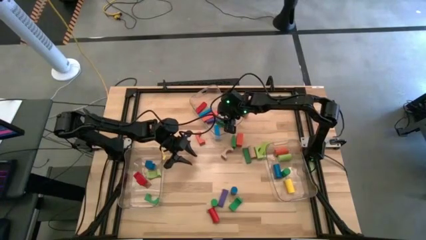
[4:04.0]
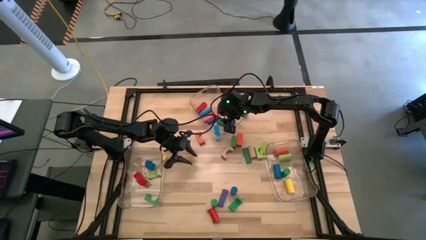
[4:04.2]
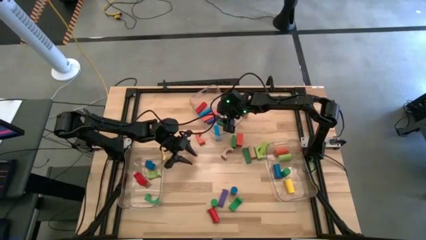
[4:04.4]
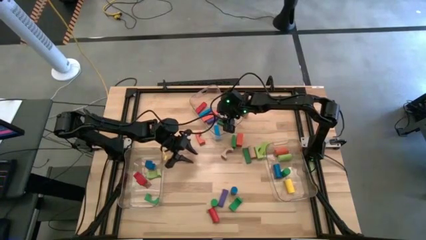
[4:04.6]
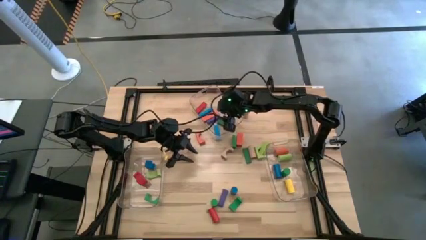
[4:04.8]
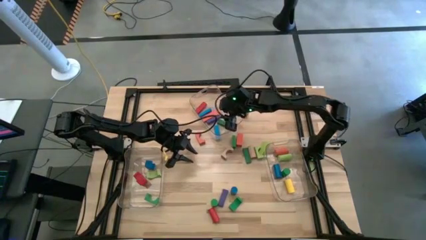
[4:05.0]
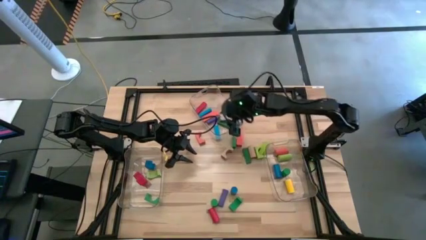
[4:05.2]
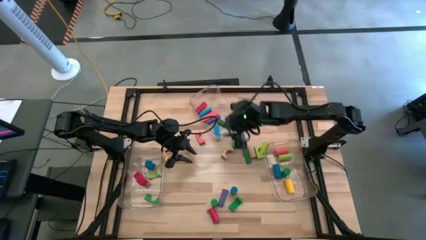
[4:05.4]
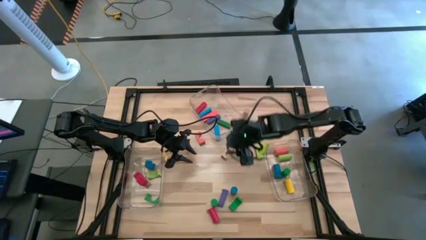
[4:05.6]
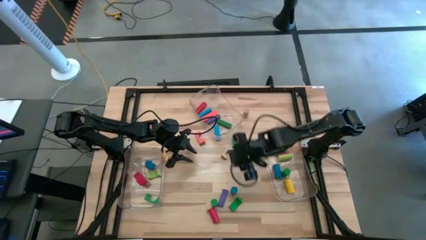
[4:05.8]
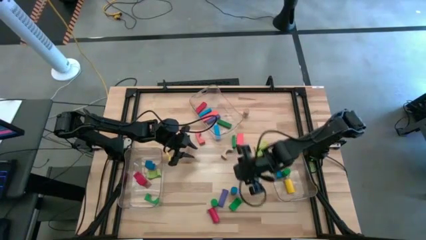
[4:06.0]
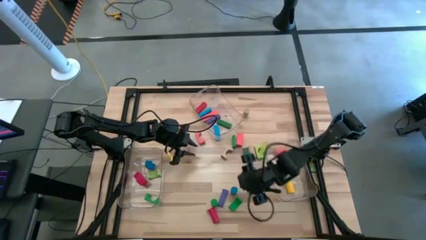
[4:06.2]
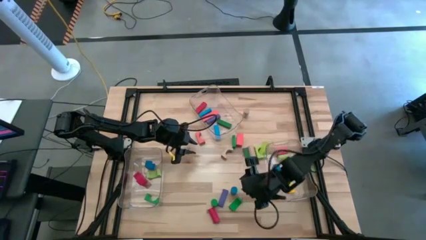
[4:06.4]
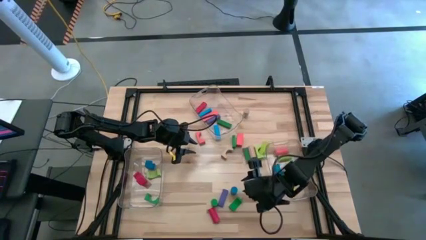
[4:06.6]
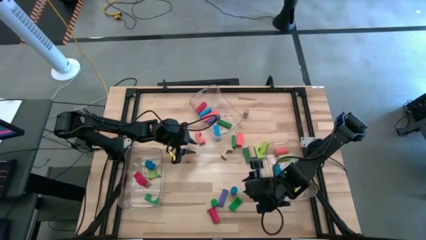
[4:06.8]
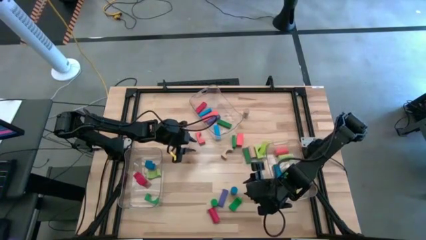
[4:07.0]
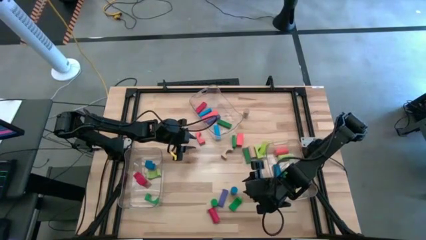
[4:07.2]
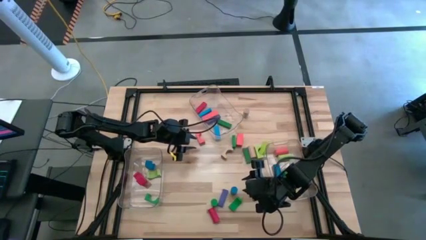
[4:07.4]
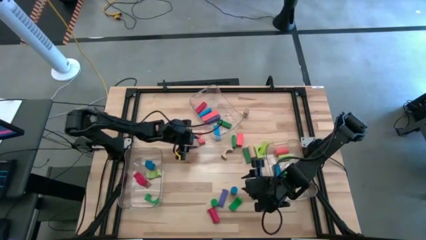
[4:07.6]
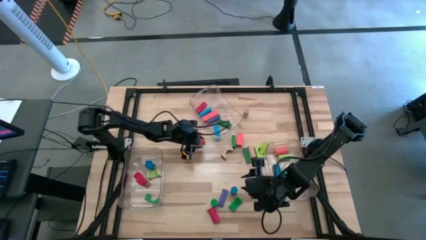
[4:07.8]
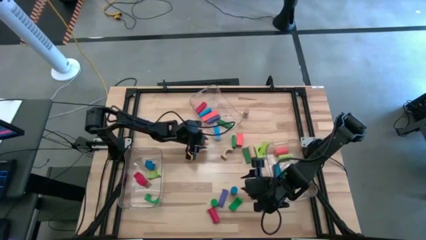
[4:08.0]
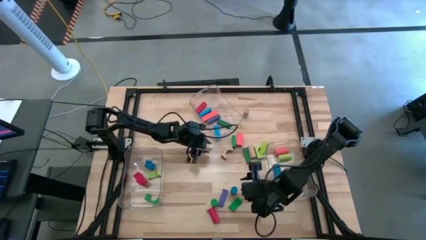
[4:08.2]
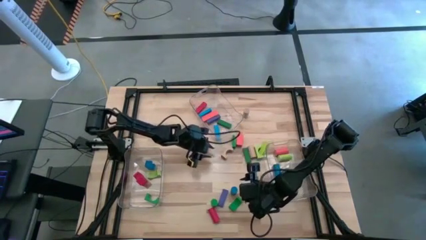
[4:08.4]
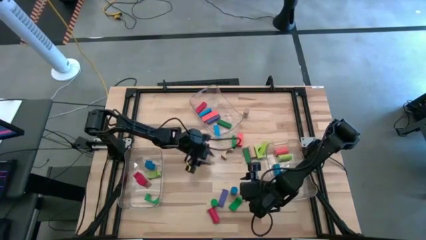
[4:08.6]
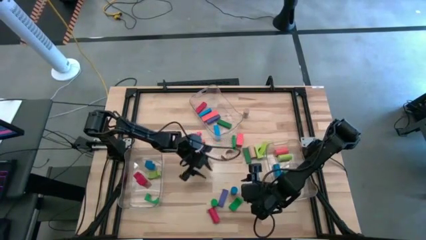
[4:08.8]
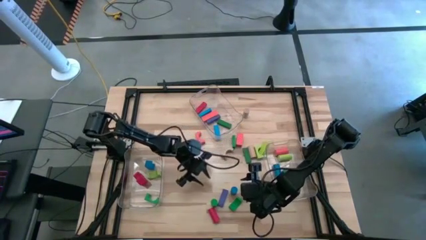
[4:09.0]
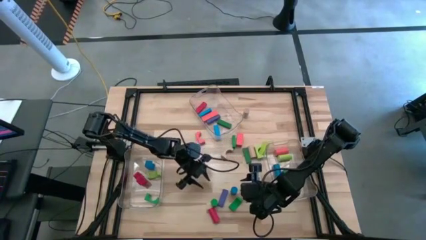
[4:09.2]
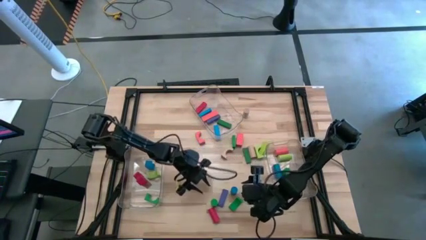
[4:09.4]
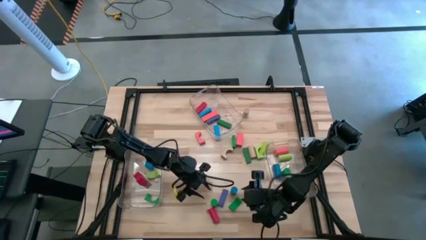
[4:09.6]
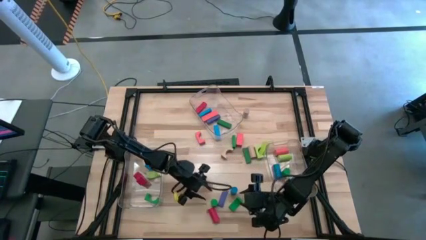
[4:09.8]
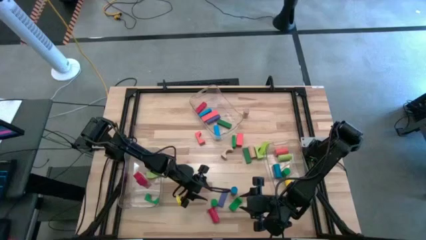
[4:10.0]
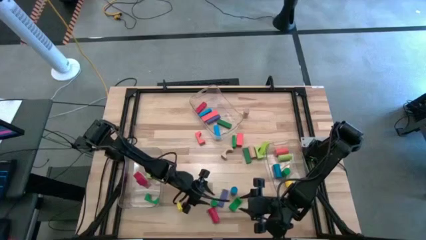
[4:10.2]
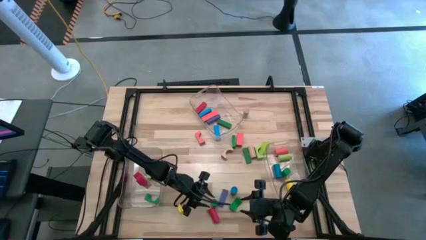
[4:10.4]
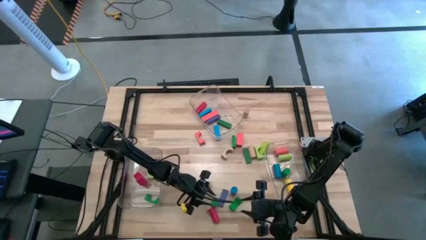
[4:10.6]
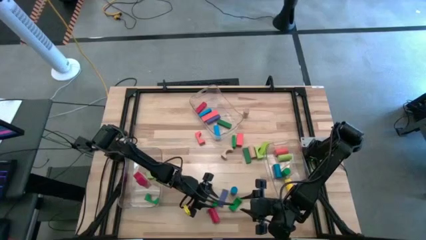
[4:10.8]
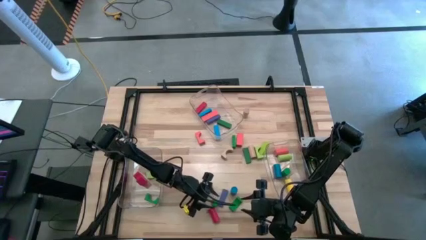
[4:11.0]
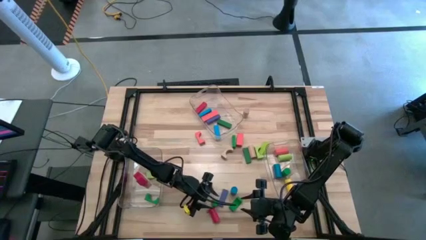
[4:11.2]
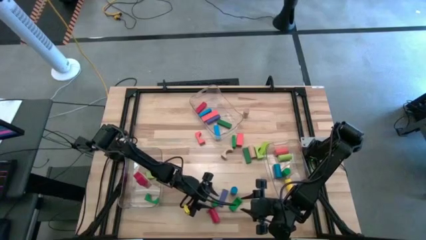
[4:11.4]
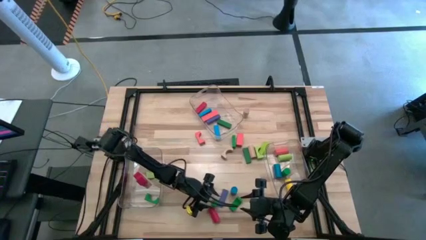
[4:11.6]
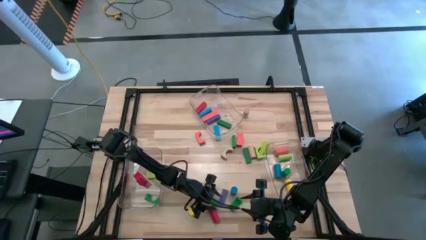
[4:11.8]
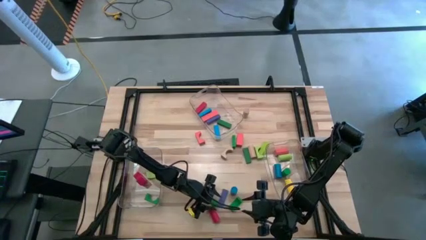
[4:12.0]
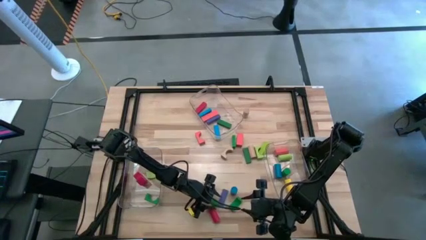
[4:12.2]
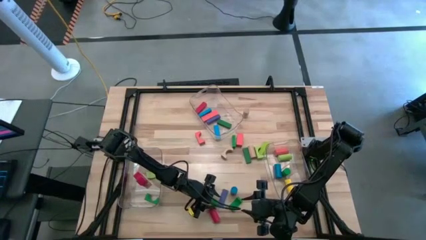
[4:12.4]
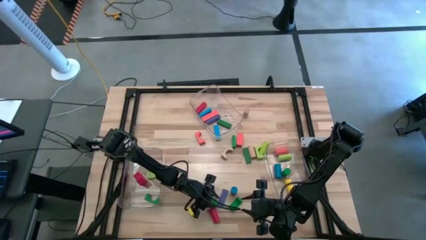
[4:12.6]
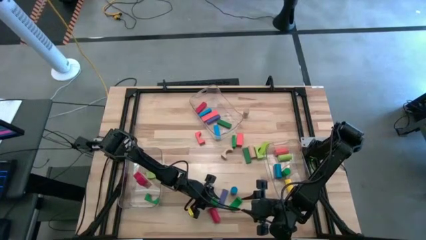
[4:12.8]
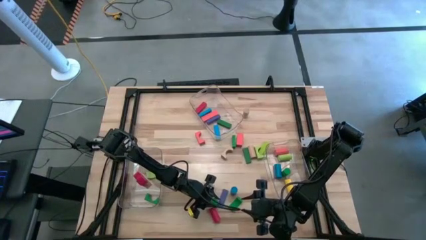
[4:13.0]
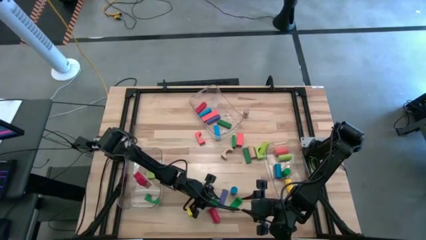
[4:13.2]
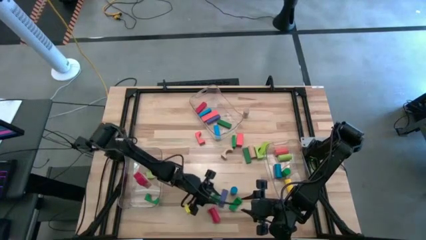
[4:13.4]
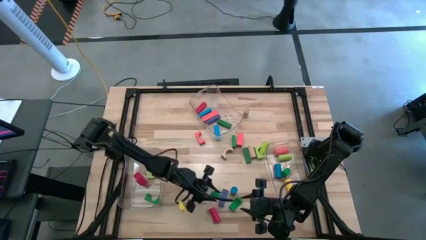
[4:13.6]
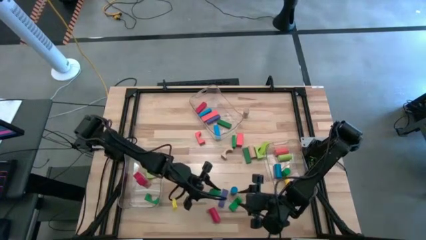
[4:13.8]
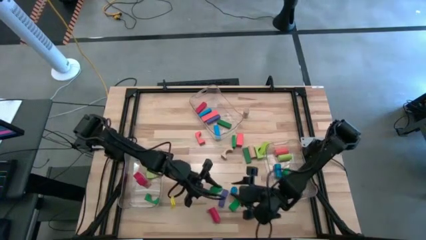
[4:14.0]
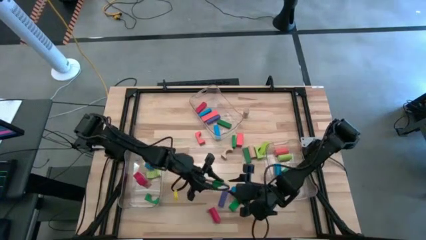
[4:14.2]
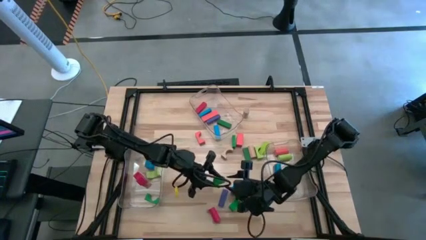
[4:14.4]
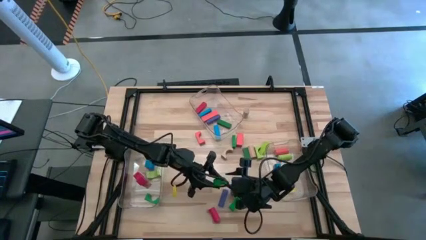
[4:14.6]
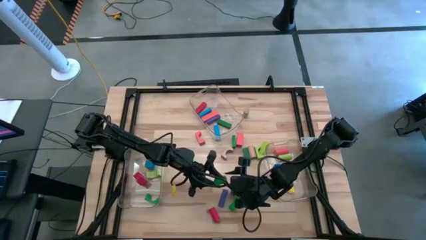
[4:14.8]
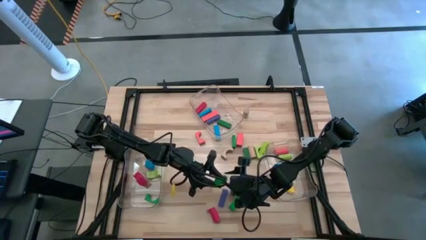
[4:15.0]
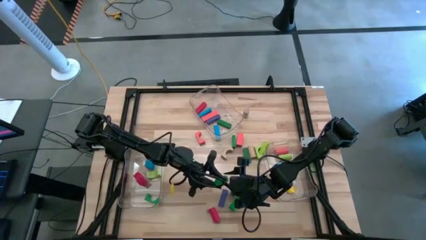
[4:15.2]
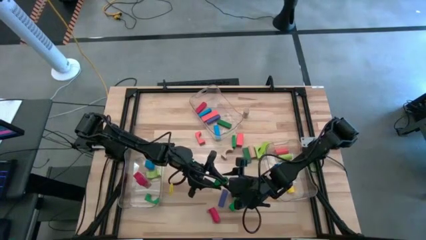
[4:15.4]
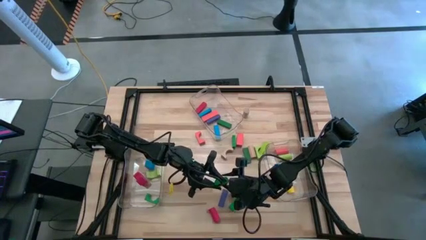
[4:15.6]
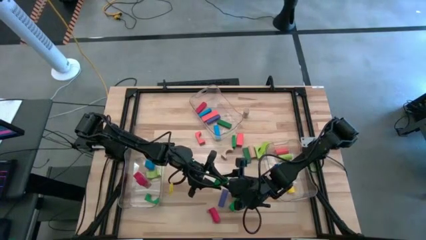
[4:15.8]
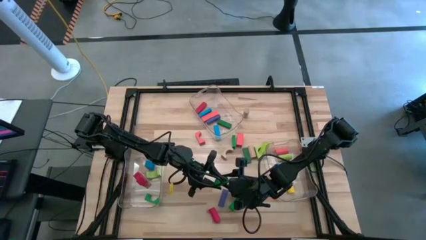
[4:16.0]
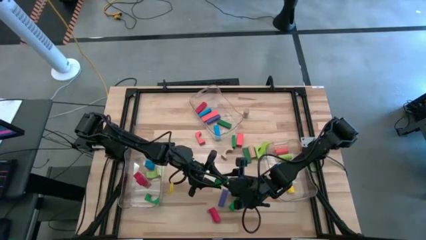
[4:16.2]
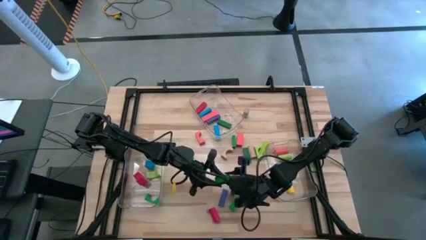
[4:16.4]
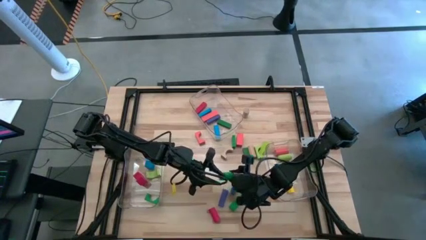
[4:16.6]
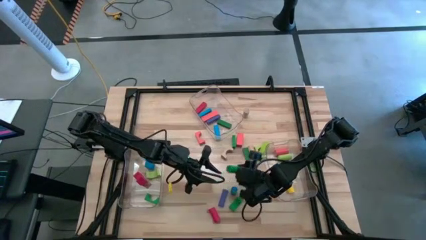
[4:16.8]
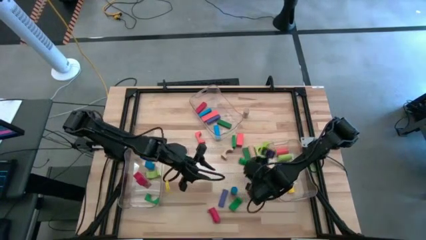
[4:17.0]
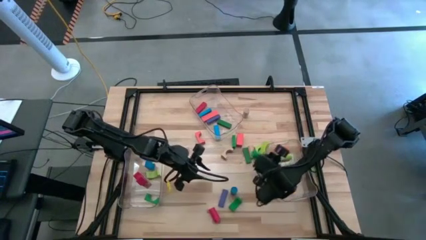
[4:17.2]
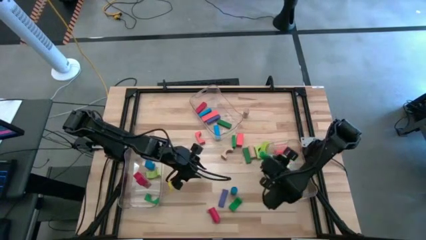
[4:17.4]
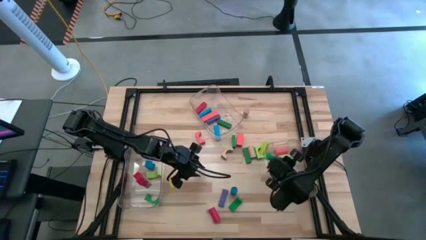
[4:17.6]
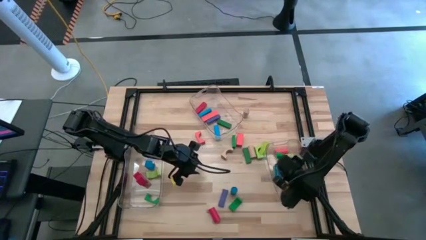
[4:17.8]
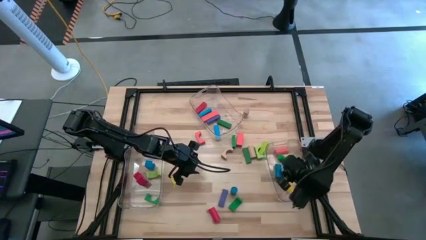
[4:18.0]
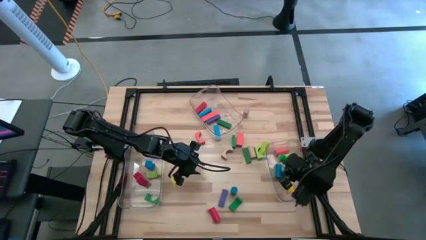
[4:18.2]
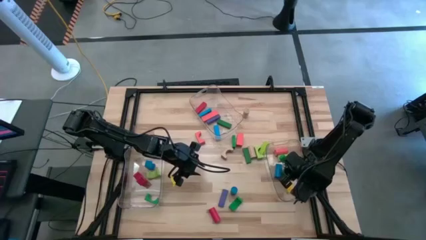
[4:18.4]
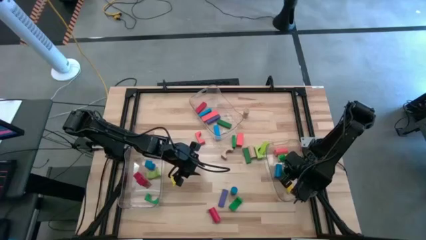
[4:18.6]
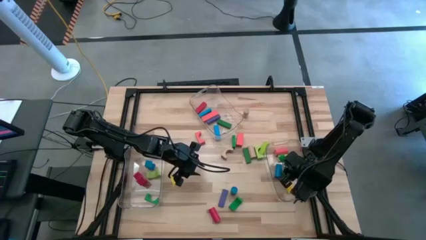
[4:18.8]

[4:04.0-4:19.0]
Task: Sort blocks by size
Put the green cylindrical block into the right transparent bin
